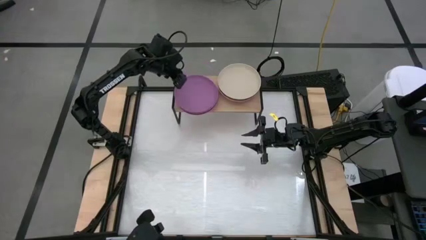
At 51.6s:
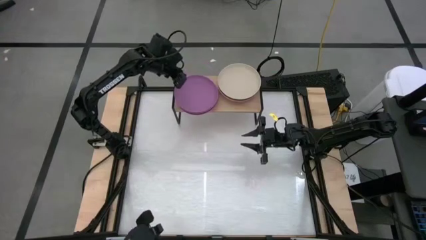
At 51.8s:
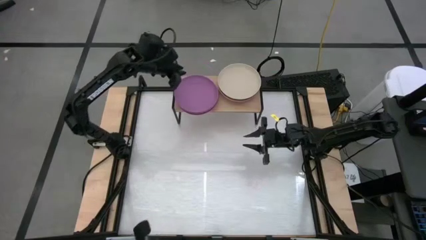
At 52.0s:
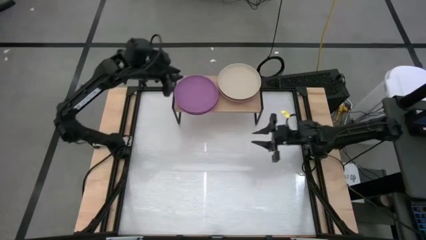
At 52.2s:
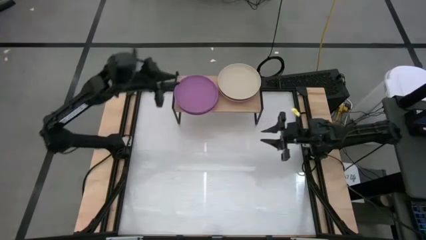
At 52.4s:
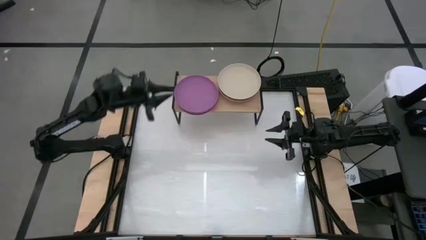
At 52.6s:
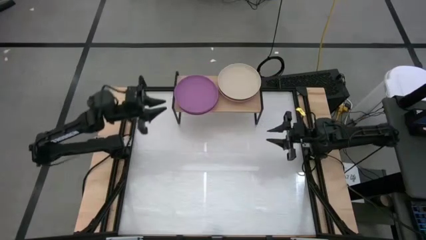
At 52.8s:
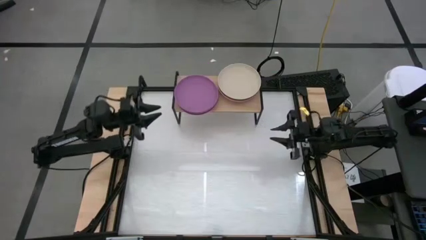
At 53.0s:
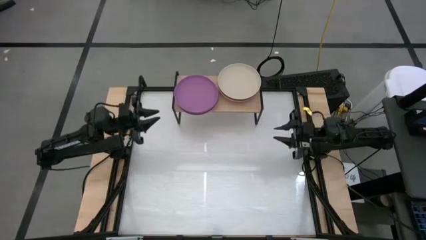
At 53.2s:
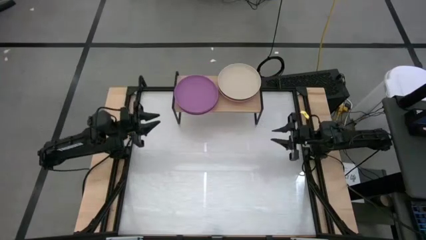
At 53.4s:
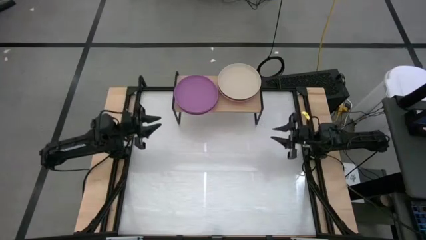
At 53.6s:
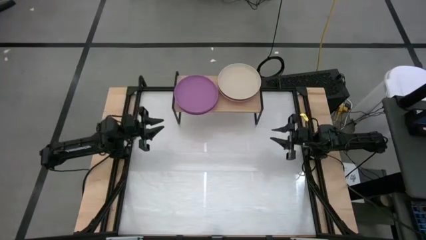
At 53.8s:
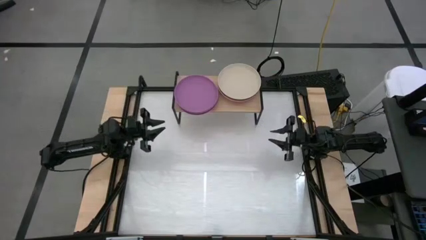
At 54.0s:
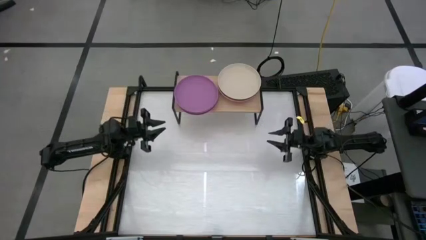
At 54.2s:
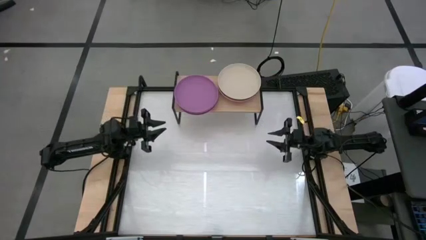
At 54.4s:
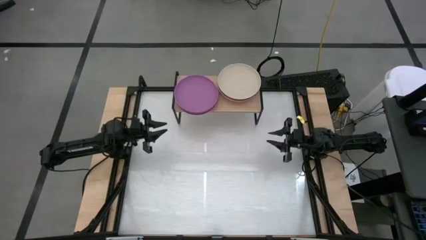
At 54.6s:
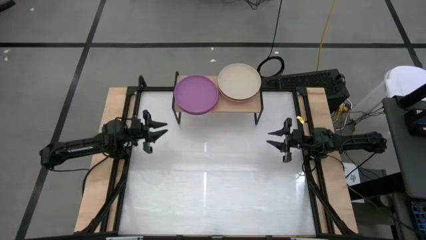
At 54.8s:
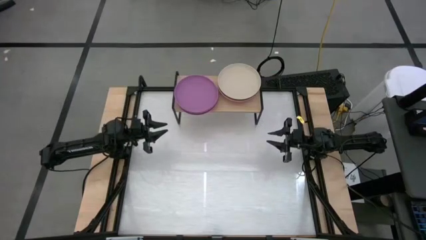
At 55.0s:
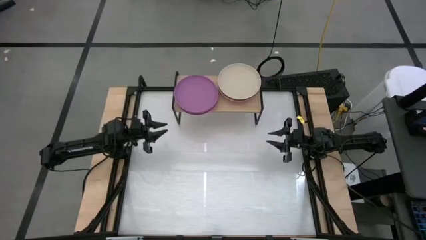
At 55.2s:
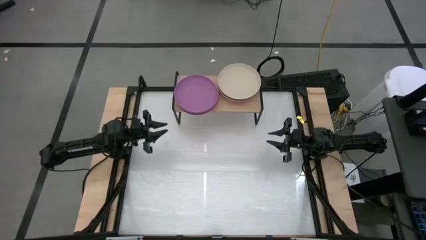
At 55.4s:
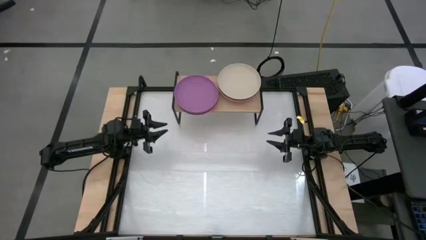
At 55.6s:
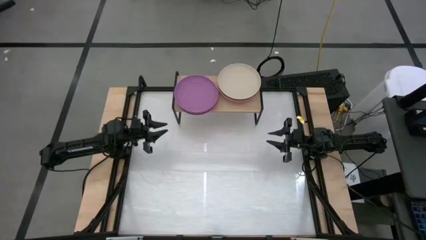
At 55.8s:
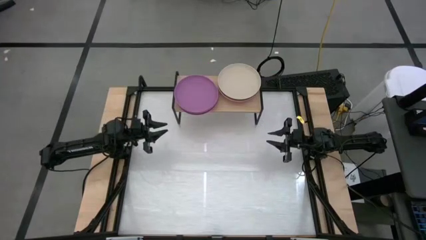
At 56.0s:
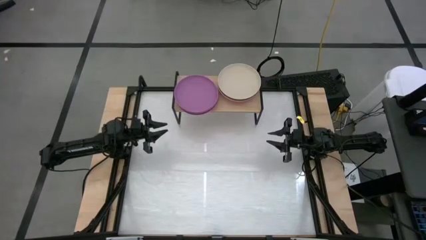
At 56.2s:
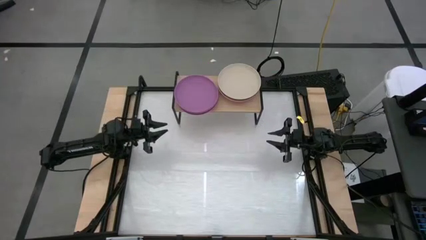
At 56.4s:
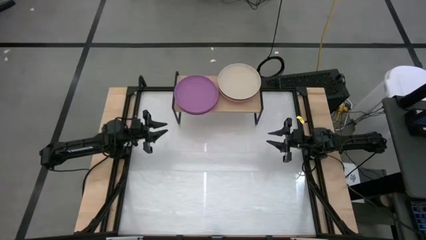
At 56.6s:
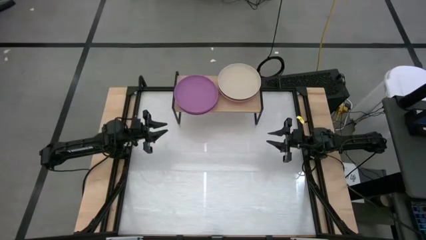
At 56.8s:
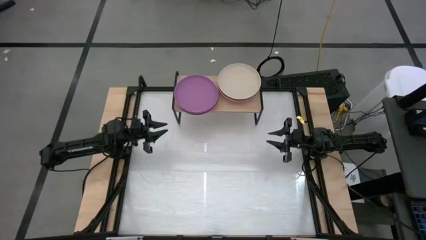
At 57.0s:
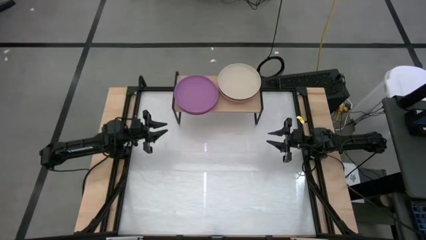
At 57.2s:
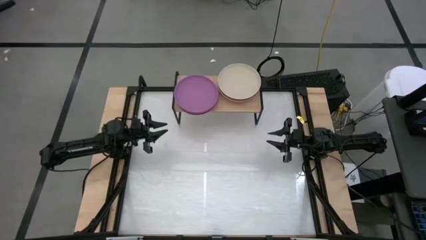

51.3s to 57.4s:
Task: Place and stack plates onto a shelf
Return to Home Position

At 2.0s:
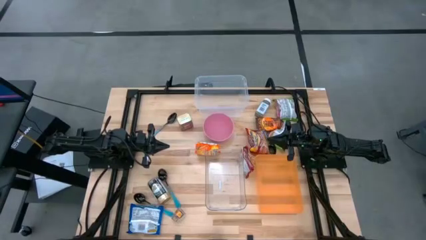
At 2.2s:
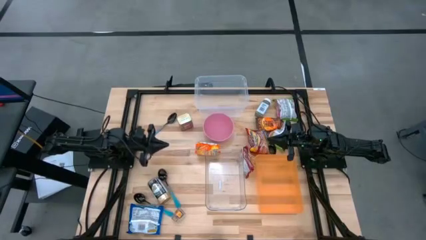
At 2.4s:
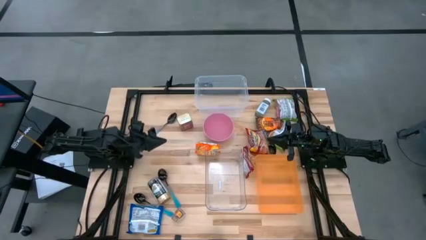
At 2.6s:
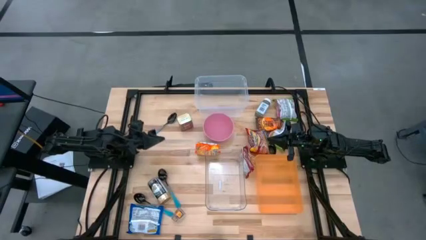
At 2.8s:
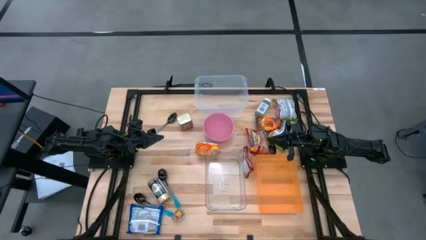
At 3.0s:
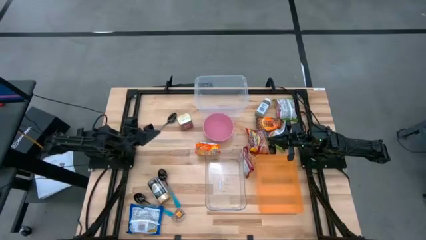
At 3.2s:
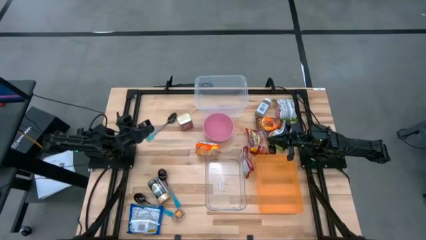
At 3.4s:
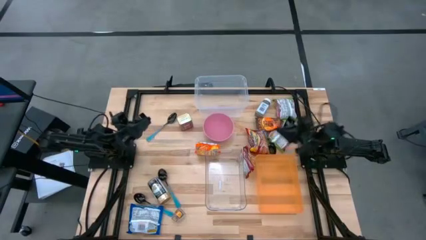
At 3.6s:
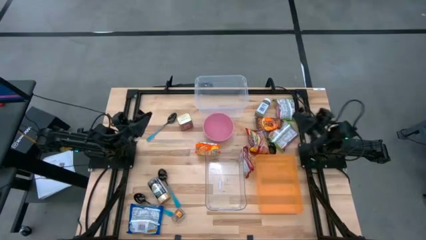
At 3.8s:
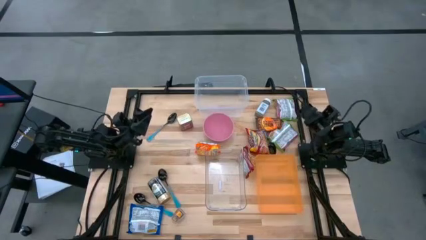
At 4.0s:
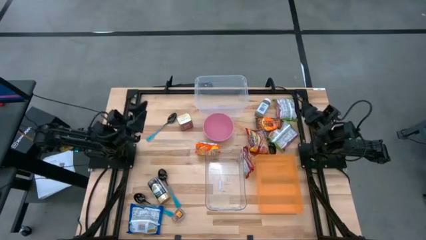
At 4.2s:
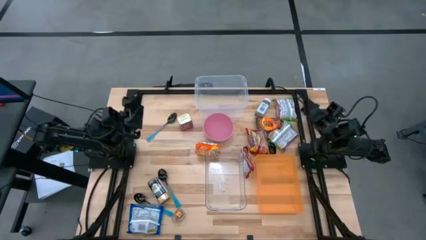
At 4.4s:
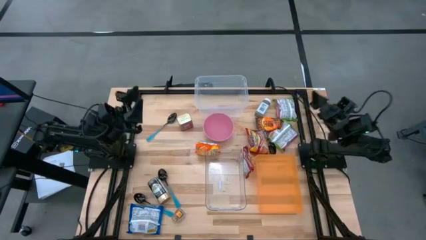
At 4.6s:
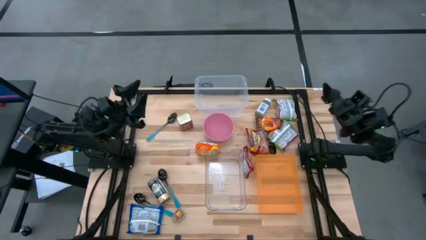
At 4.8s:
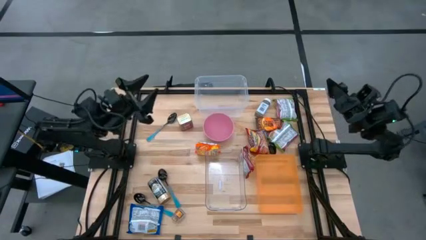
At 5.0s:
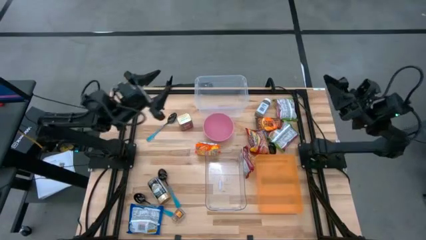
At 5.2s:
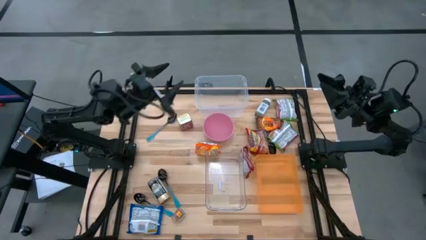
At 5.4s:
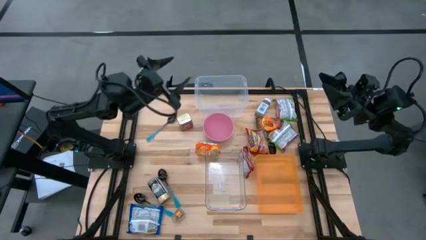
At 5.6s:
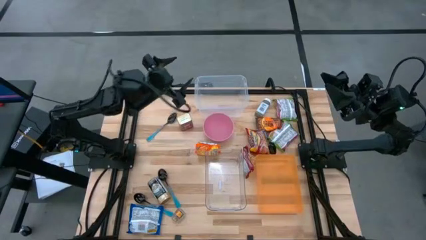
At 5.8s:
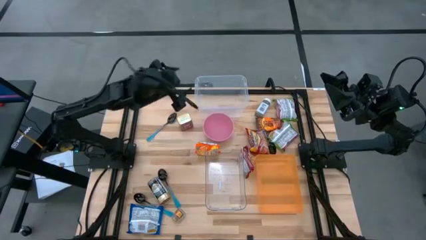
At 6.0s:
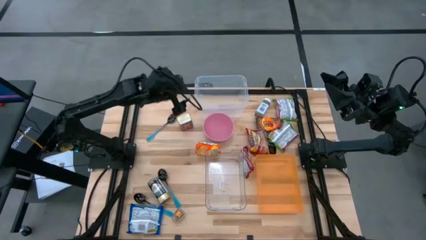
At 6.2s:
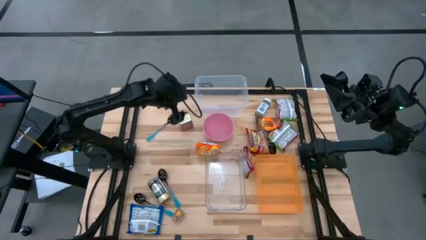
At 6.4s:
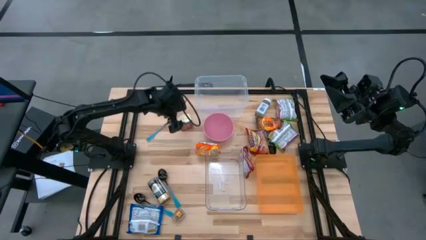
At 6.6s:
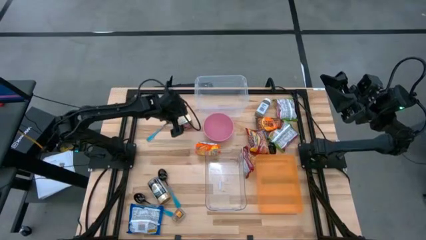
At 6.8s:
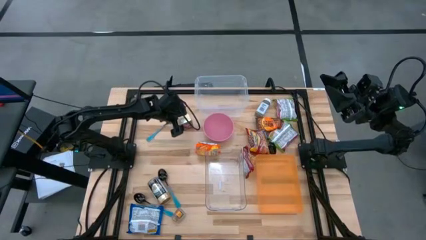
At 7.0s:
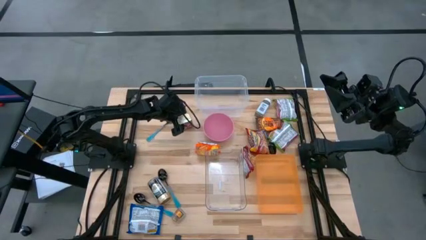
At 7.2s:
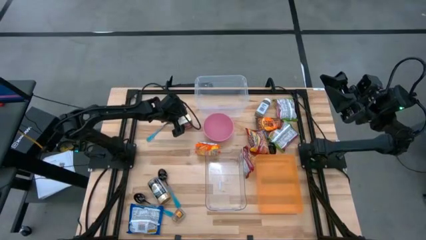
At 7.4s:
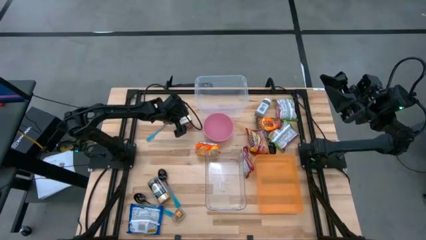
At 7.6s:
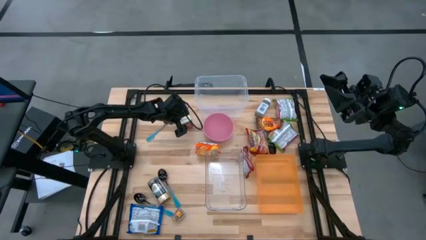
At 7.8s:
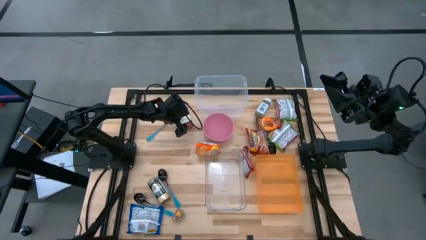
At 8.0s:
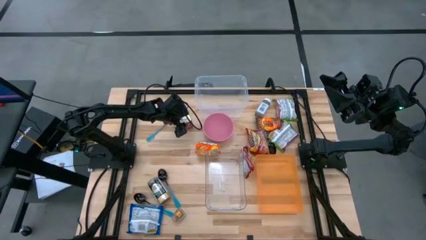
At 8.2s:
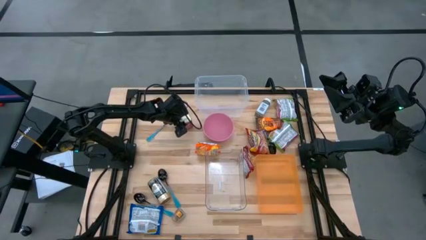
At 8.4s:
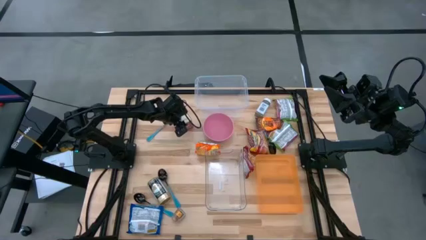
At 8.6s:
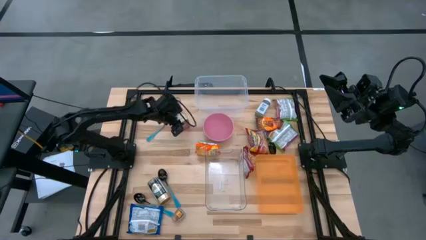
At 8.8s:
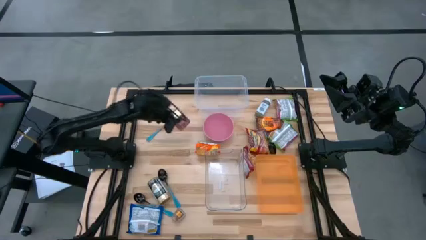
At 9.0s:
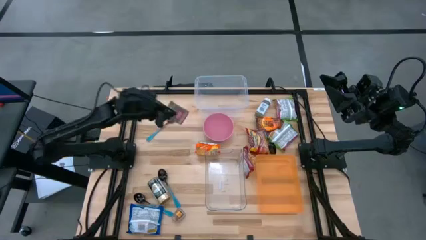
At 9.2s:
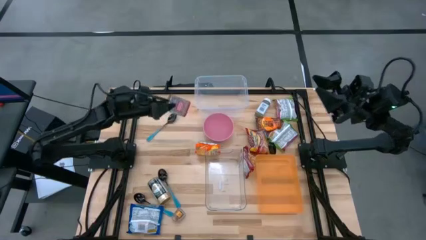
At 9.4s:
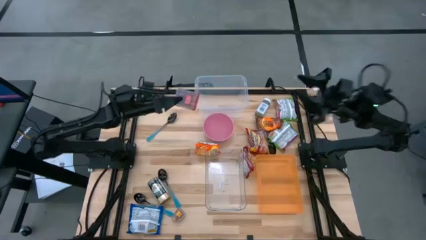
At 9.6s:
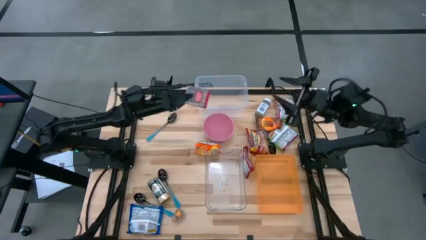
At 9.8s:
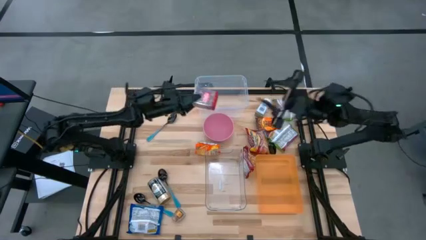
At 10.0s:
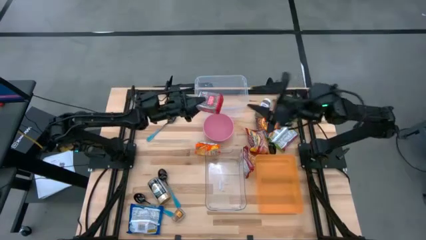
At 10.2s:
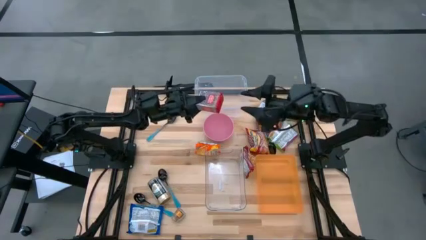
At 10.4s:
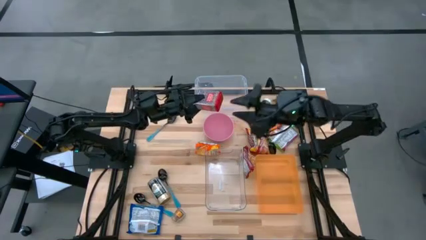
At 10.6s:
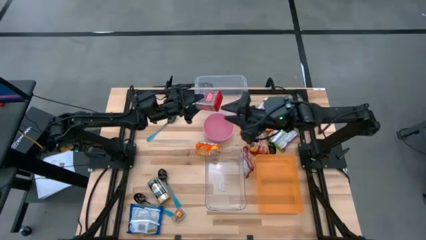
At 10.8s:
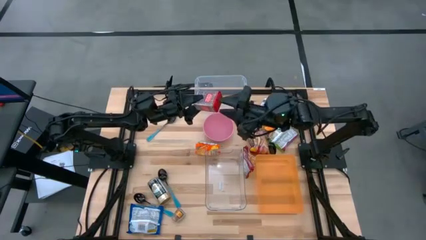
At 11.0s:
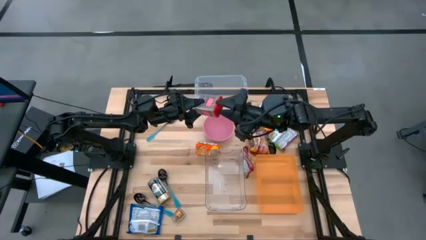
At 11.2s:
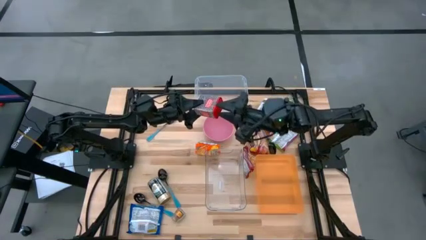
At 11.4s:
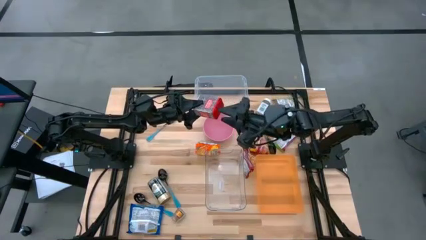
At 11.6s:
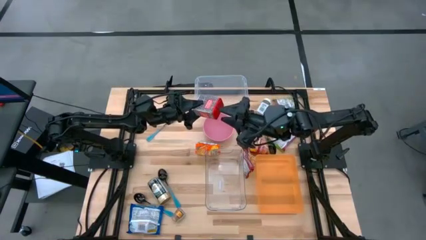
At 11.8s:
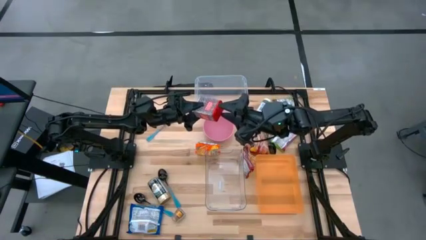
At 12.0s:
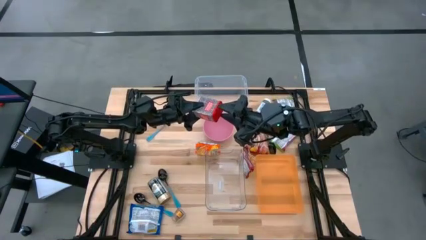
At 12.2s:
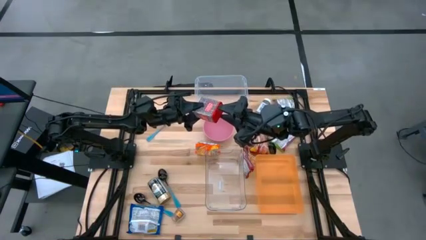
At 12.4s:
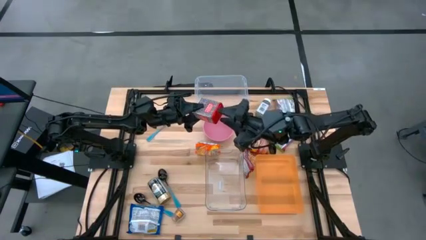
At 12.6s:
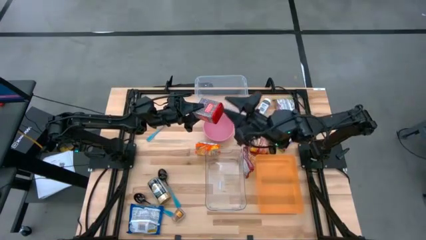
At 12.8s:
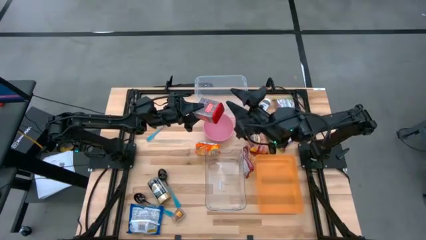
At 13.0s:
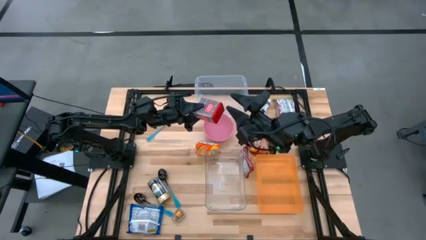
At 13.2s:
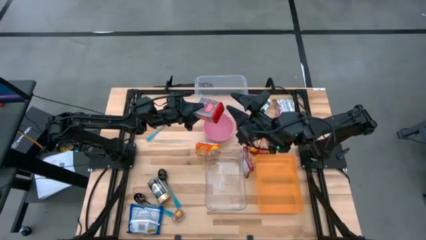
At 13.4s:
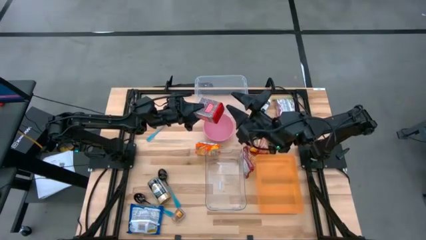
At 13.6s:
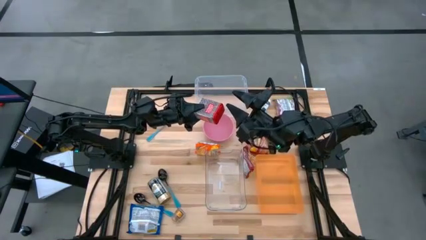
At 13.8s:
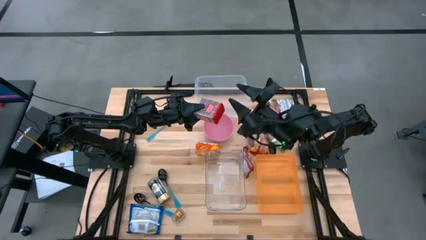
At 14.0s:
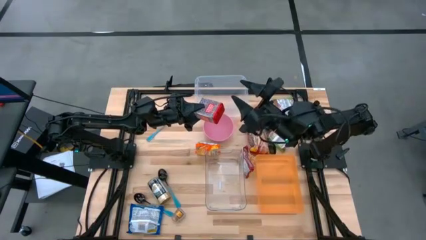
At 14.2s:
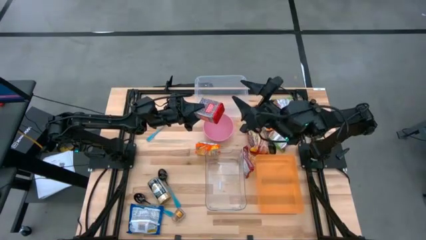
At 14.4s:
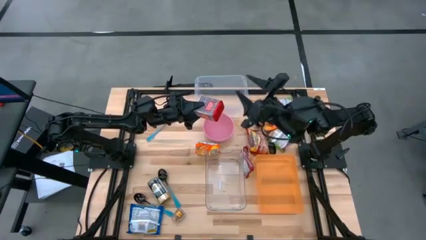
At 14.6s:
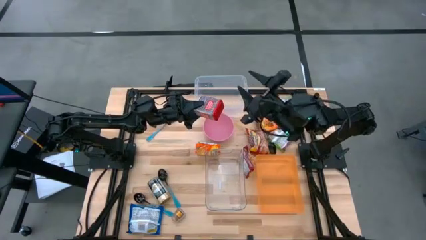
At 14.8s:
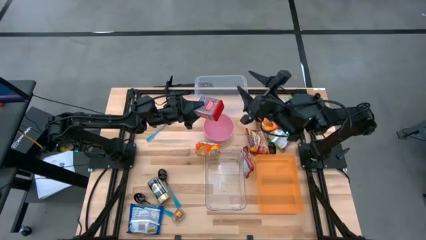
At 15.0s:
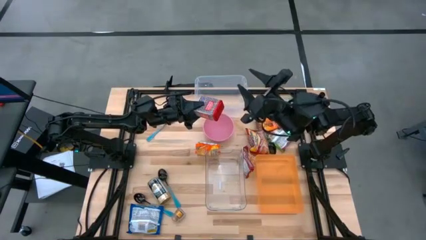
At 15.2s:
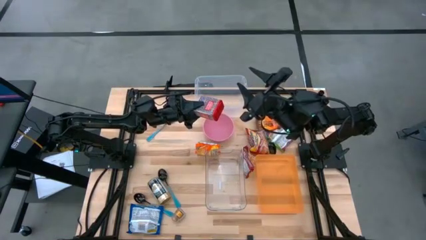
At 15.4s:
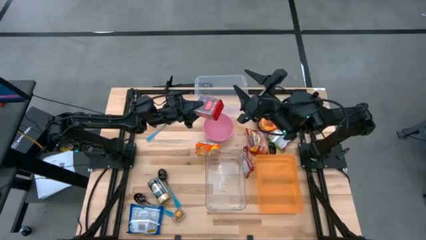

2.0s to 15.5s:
Task: Pick & Place Food Item
Put the red seasoning can into the orange bin
